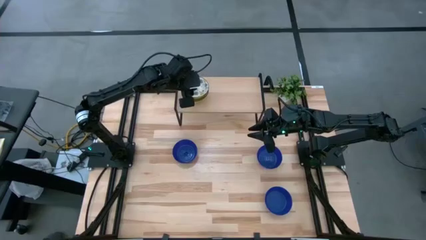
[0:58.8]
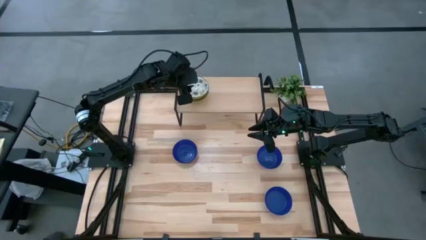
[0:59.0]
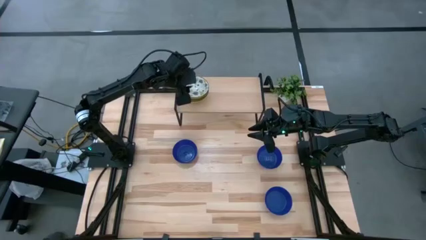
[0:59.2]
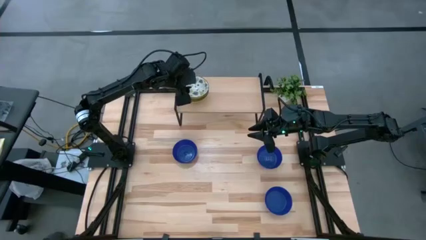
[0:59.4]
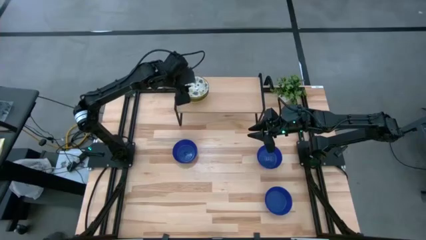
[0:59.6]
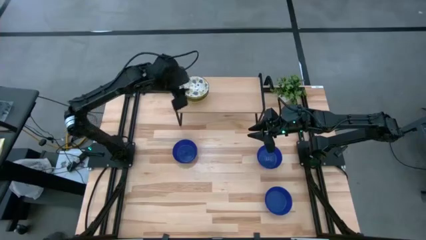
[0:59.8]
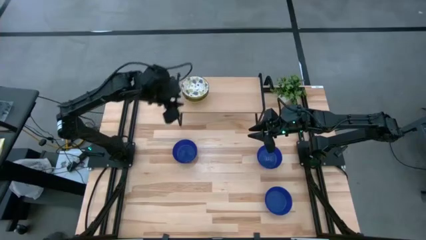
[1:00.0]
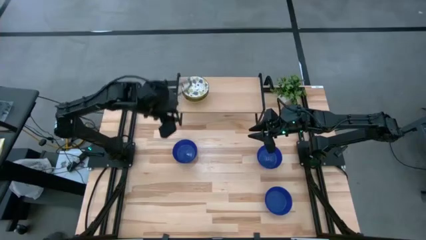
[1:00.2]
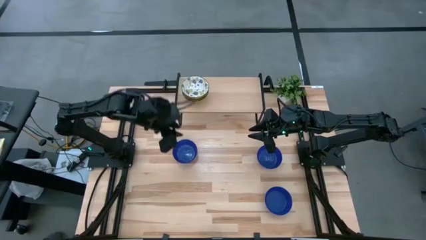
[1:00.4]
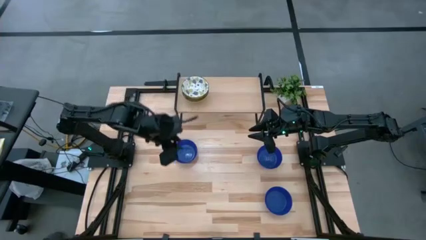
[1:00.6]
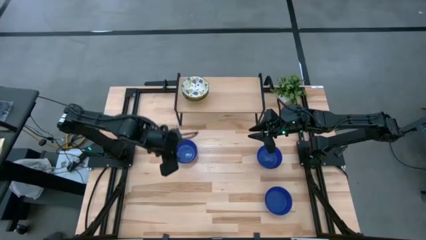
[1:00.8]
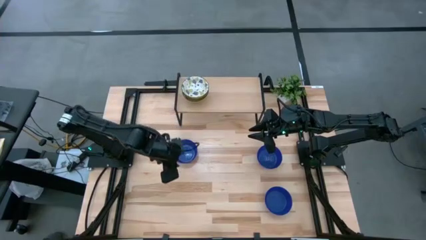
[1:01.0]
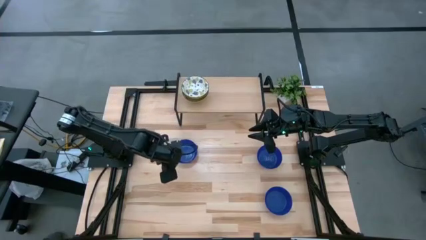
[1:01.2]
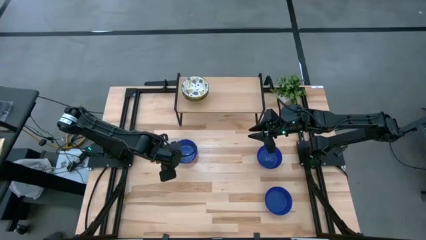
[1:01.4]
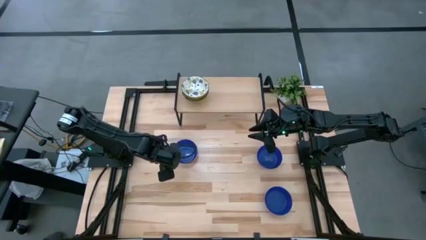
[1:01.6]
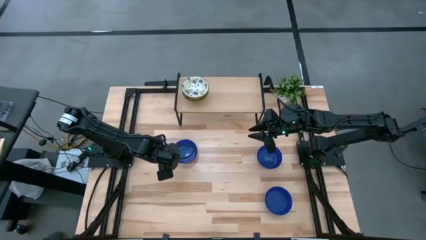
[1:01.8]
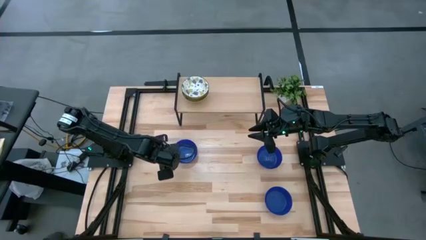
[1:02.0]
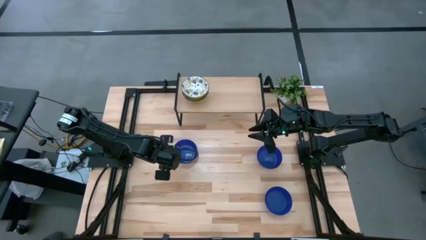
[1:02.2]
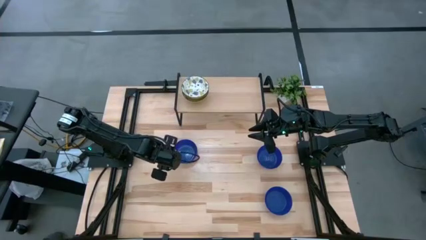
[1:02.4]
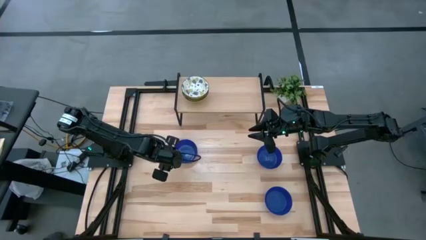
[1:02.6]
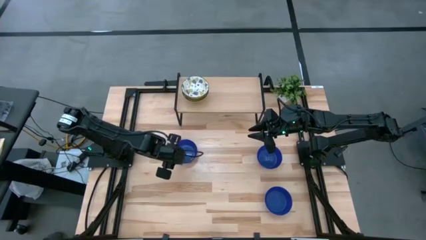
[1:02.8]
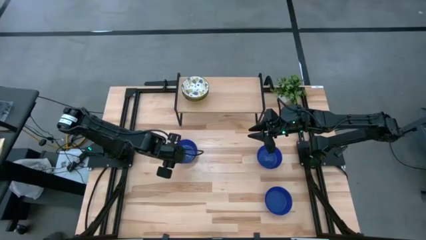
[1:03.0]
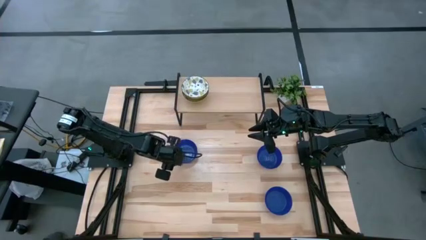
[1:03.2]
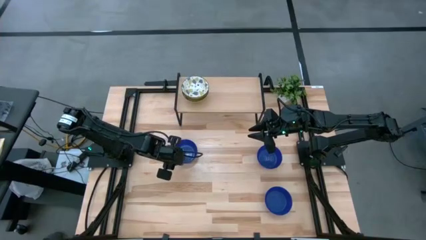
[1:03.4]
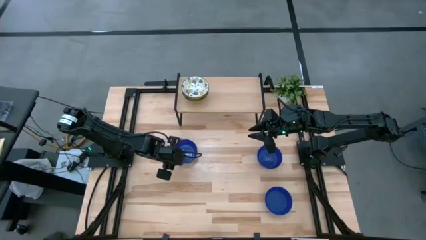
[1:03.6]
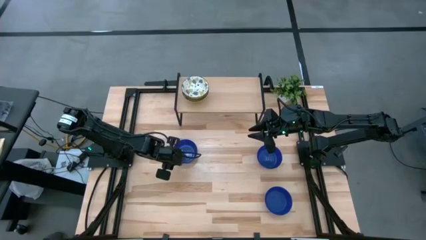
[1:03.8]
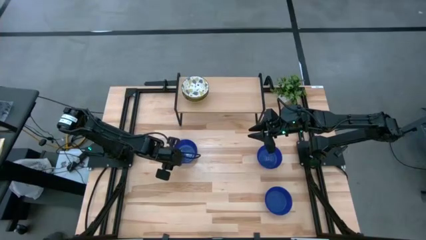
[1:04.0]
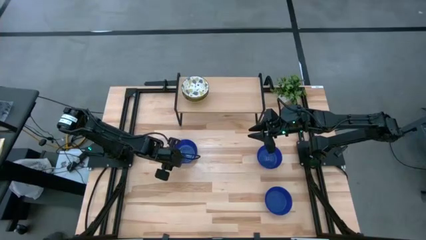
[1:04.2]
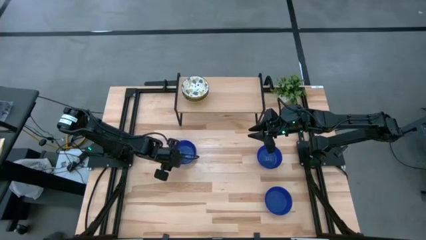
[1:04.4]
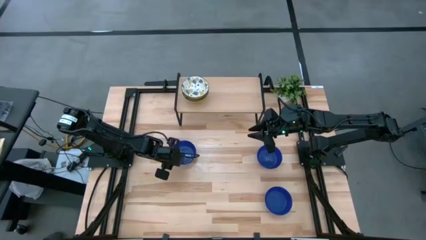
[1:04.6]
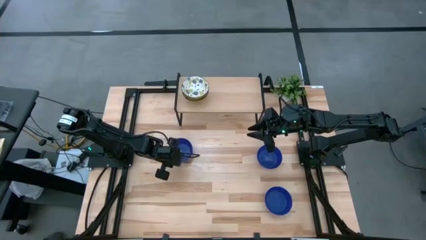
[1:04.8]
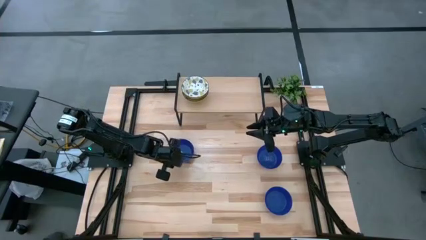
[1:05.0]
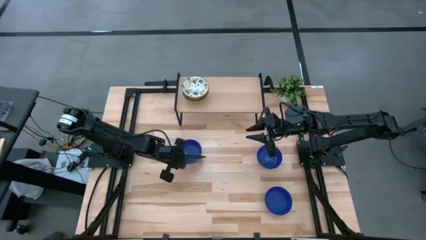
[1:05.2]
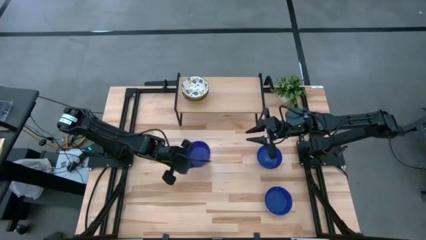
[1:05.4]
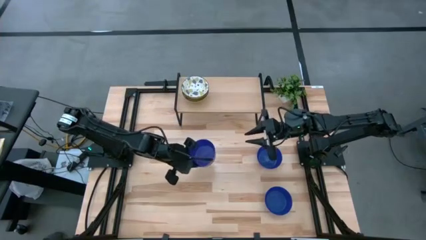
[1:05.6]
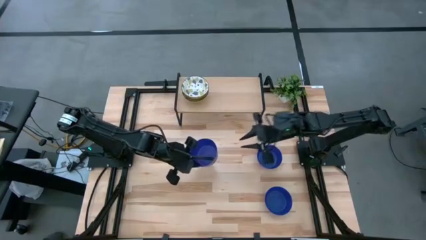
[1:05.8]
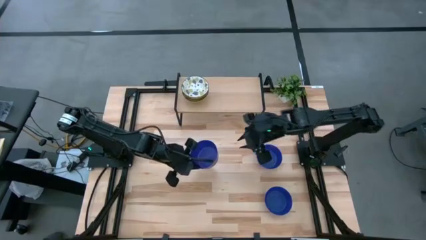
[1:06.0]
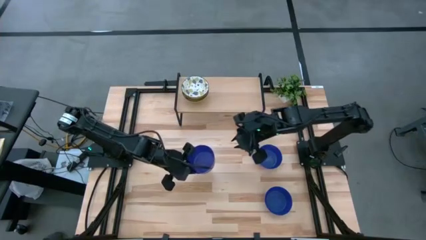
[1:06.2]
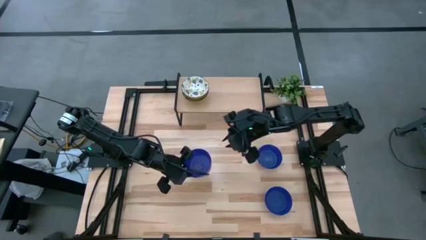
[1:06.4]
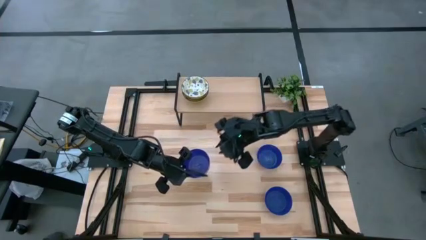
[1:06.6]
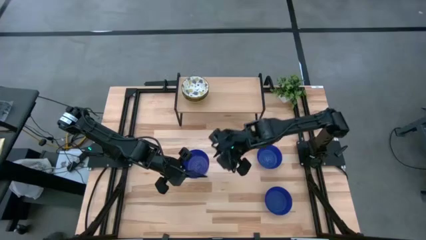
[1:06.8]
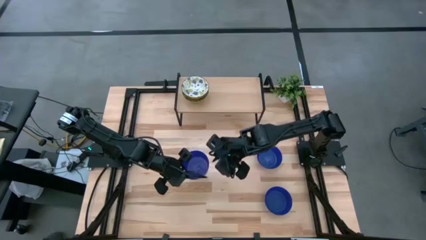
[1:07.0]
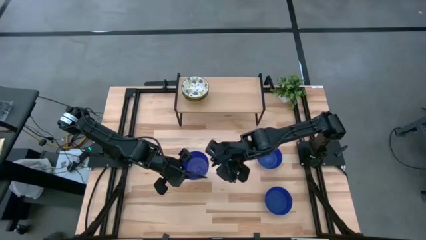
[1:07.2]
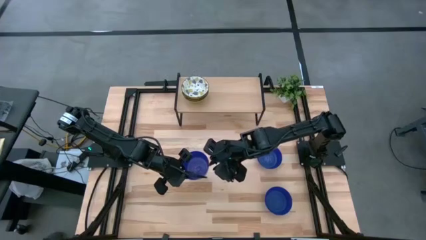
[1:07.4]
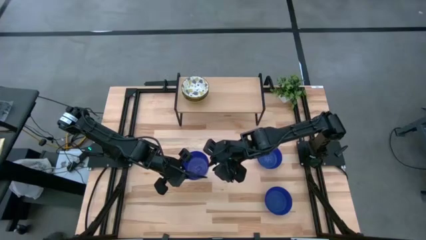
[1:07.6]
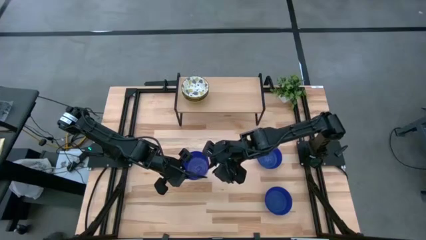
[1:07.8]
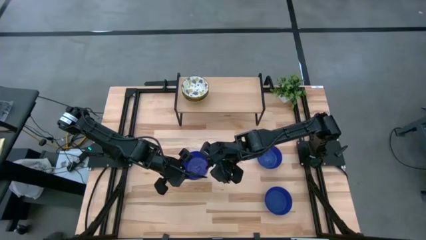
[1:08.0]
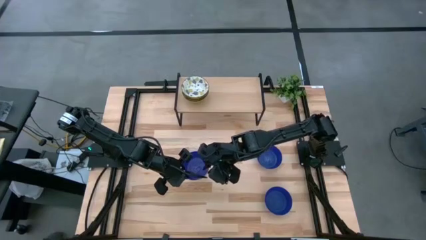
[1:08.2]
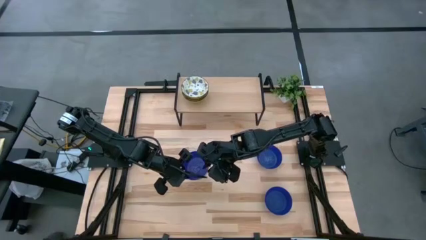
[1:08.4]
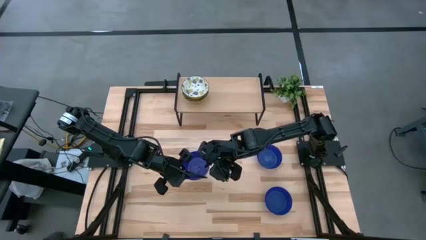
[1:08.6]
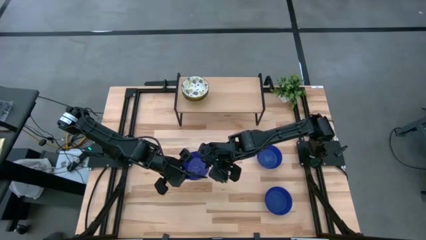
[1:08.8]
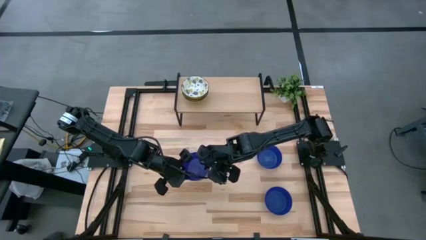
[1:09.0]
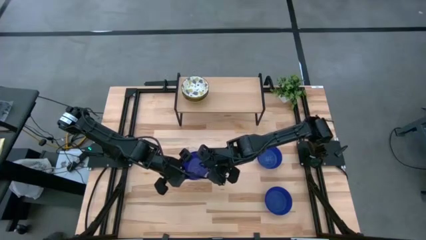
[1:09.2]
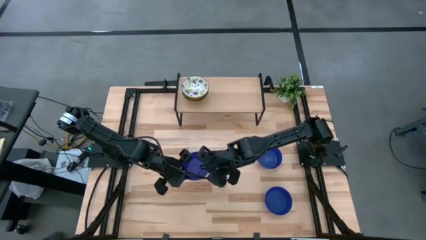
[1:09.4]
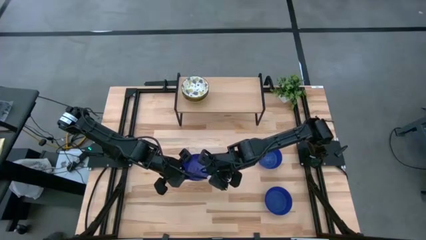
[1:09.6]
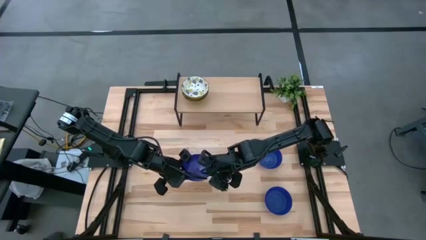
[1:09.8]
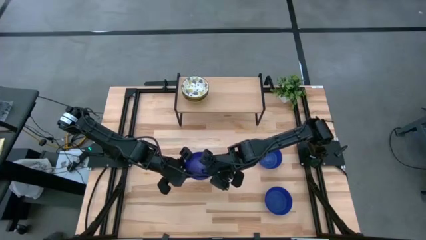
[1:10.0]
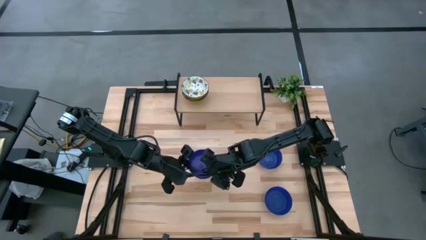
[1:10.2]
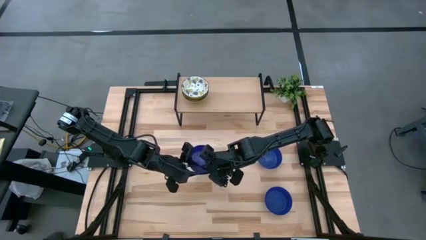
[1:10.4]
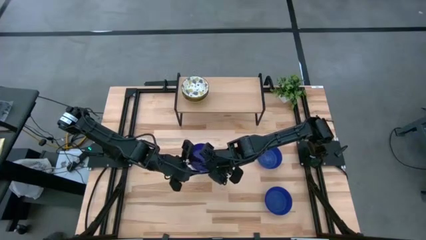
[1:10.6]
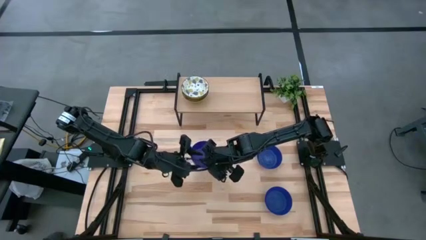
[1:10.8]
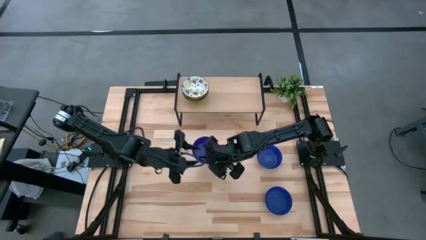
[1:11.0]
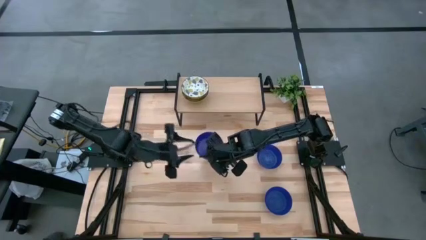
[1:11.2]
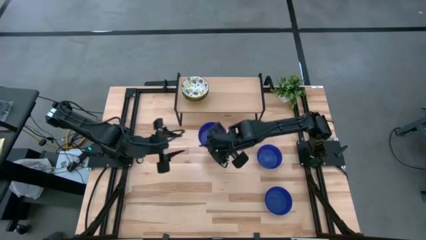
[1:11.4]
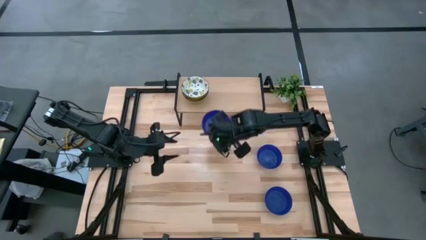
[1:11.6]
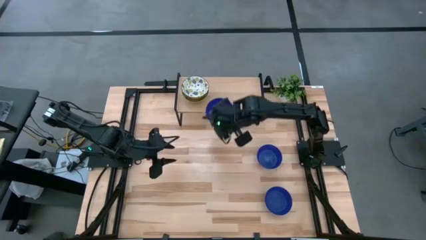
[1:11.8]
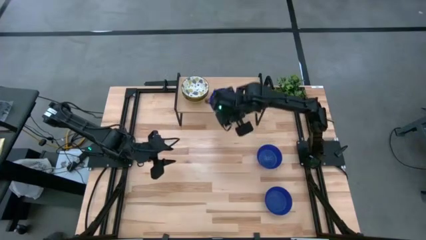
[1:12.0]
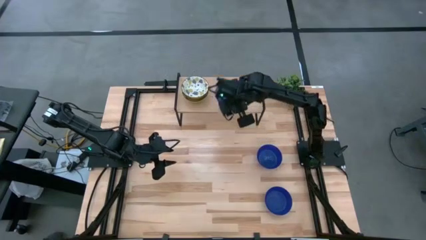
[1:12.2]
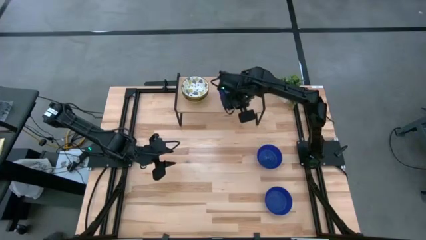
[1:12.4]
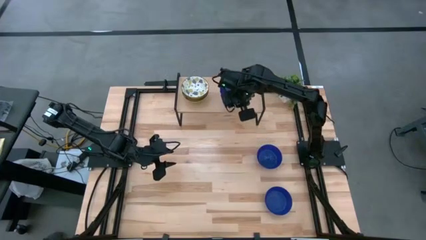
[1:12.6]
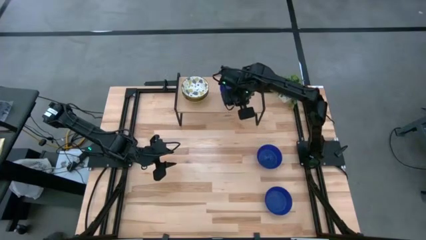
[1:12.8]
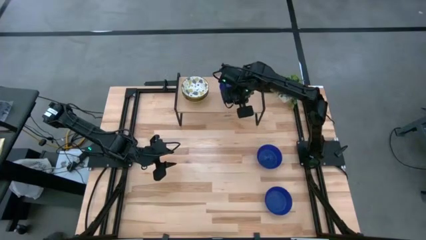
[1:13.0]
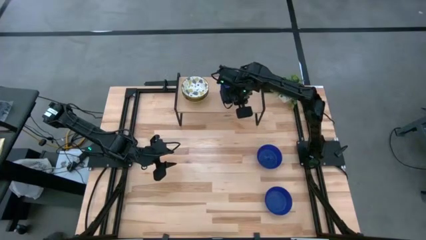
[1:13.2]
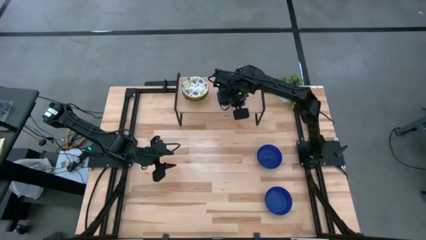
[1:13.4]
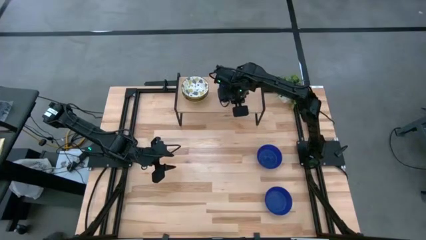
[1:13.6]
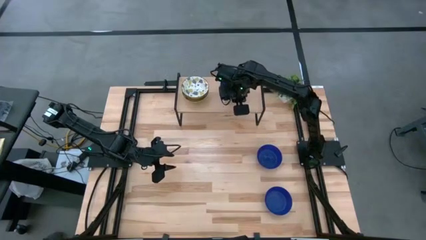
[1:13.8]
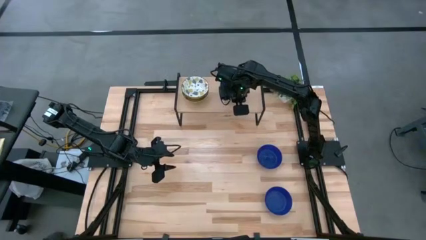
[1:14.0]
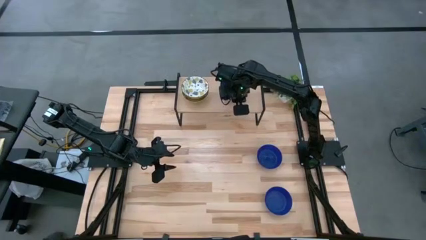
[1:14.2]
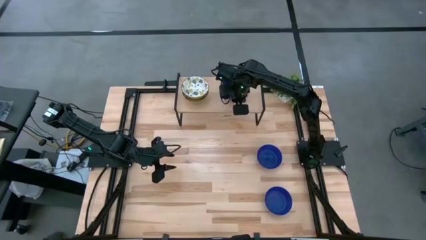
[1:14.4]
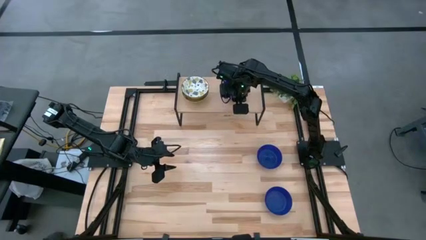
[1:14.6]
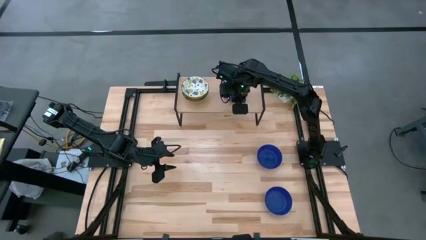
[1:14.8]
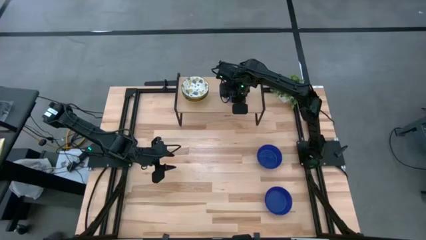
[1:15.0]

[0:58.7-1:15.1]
Task: Pick & Place Mini bowls
Put the top left blue bowl on the shelf
